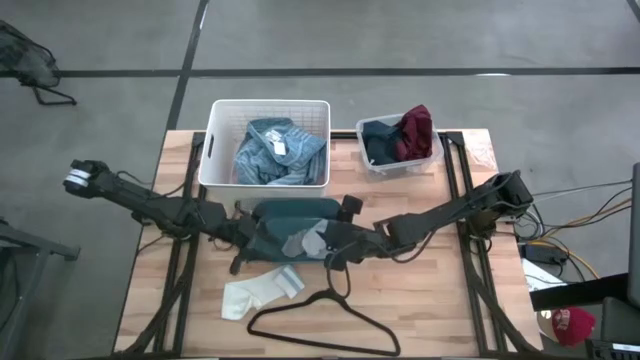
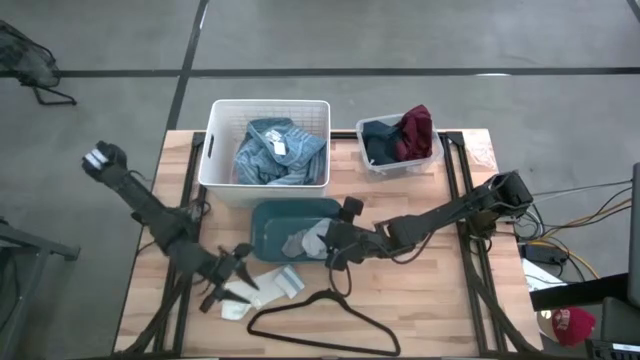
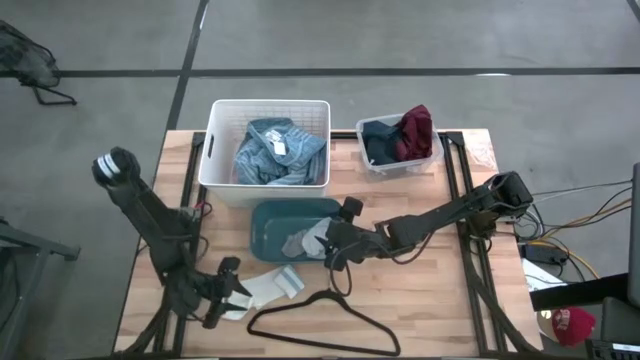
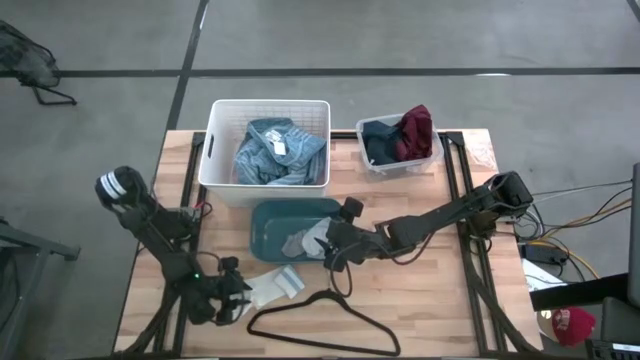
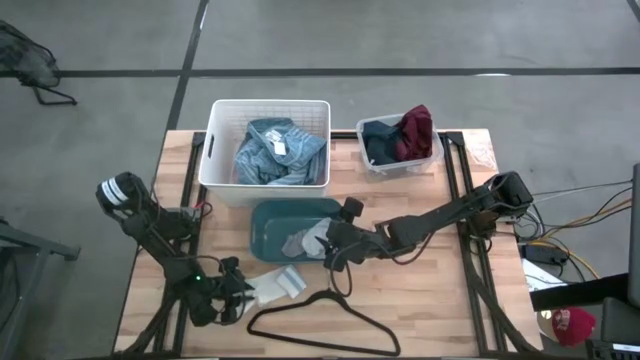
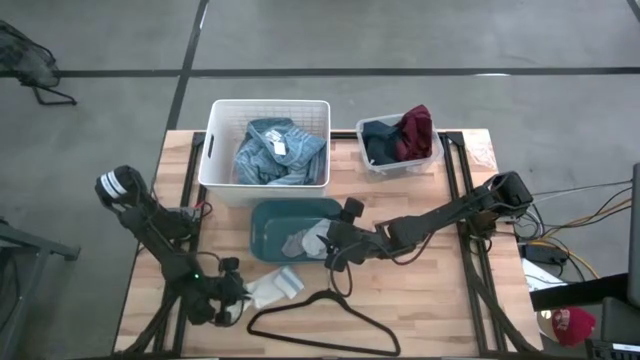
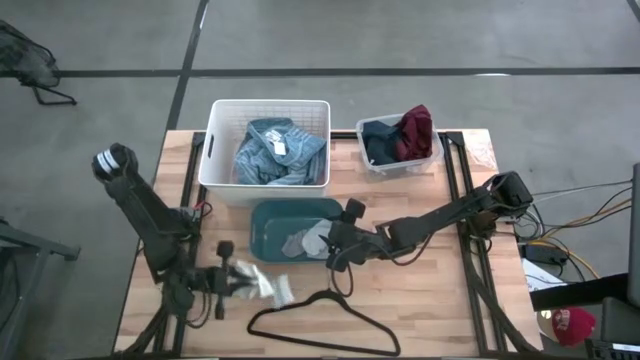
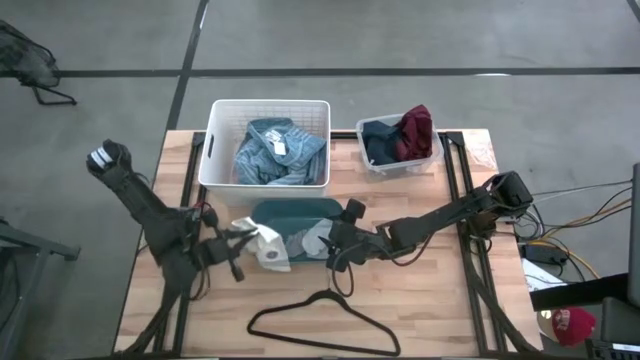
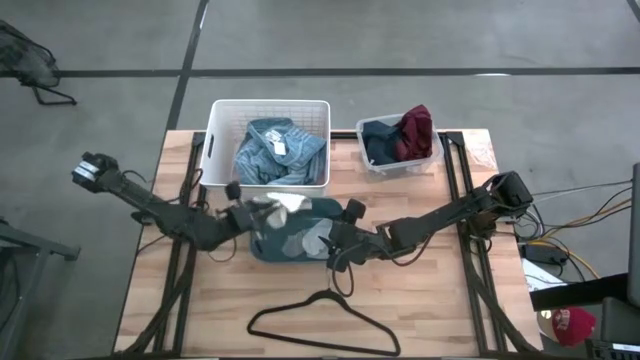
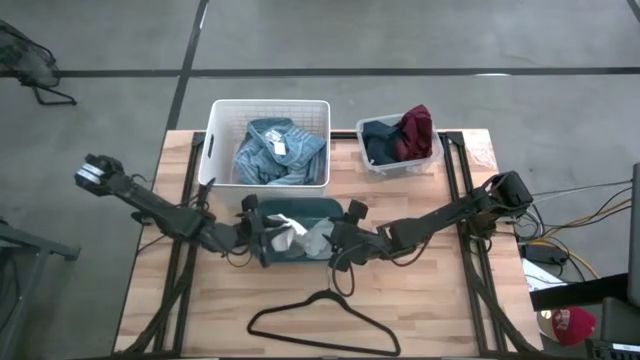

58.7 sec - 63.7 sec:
Task: Pick & Place Cloths
Put the white and blue sock into the blue bin

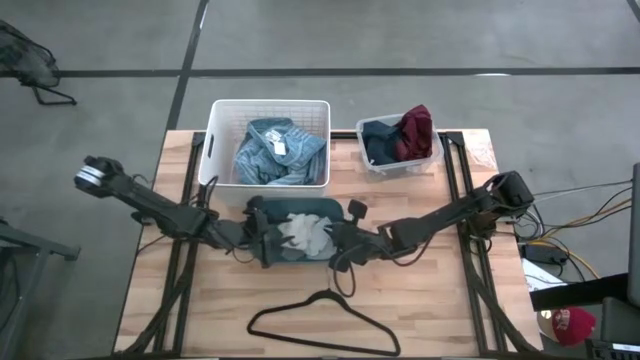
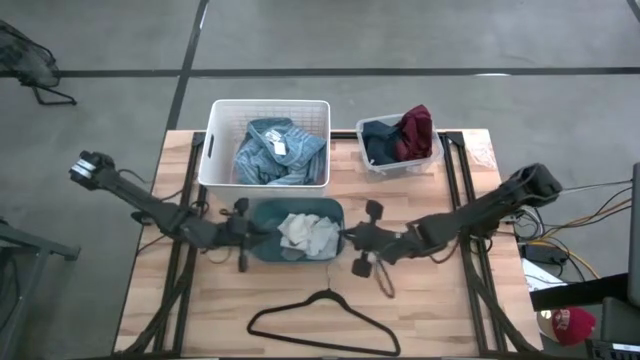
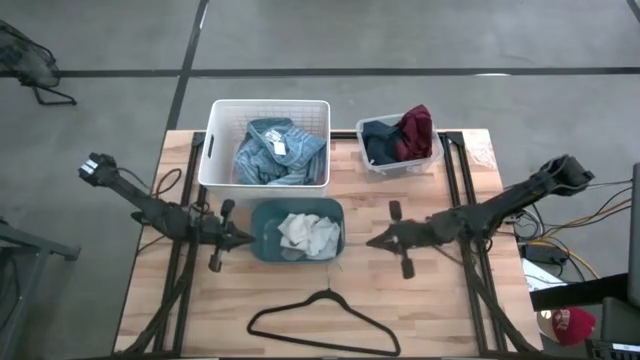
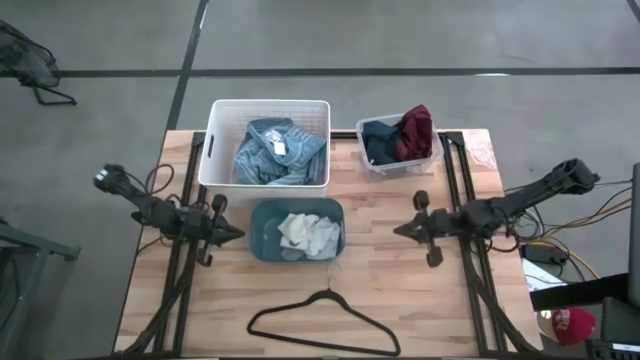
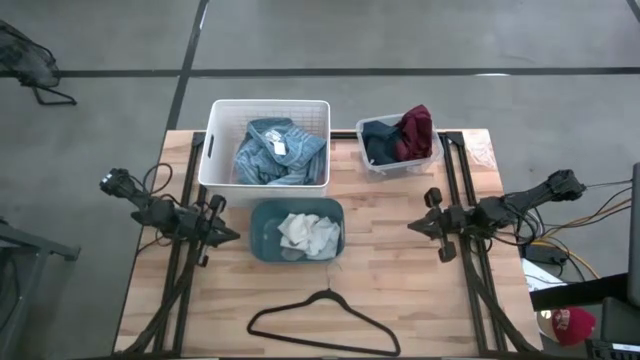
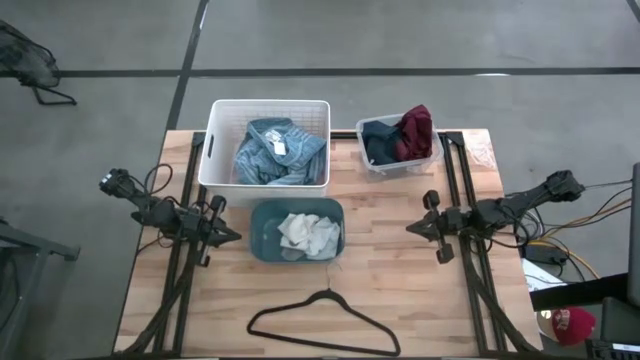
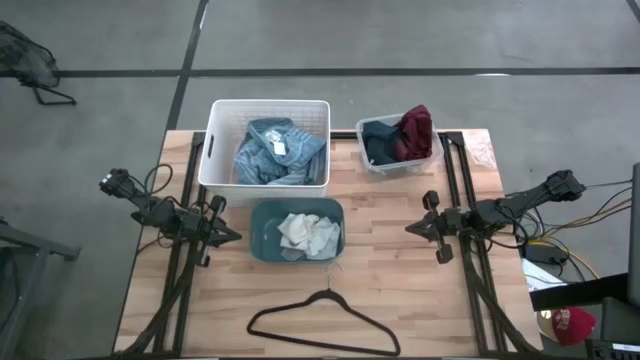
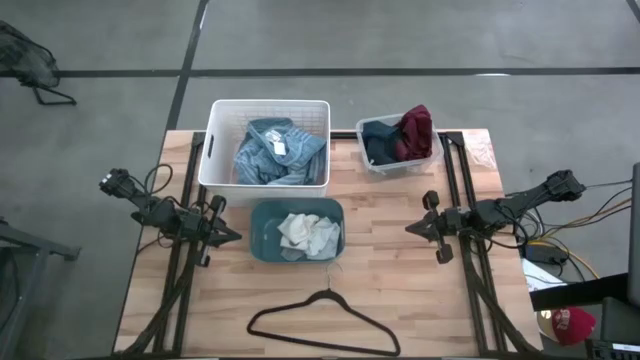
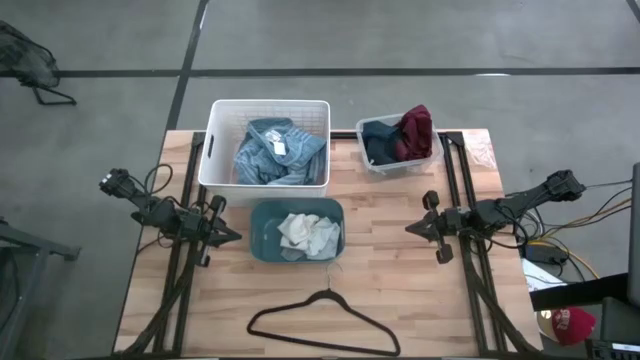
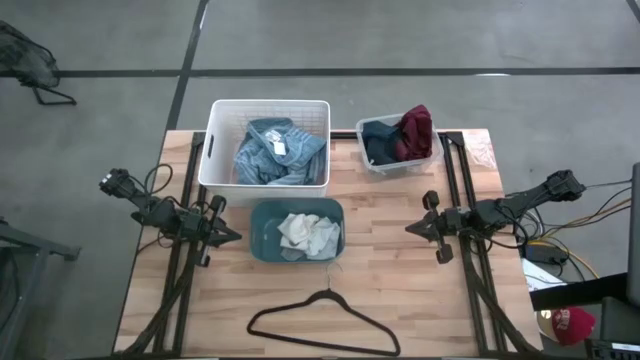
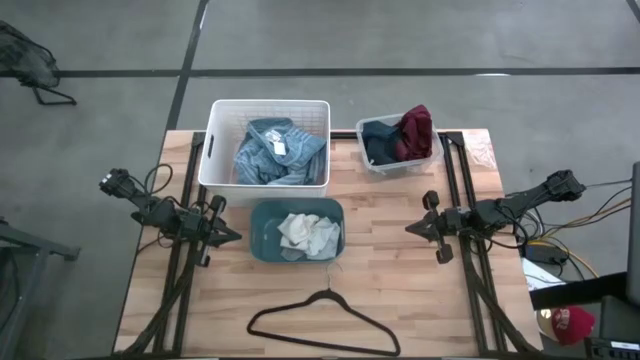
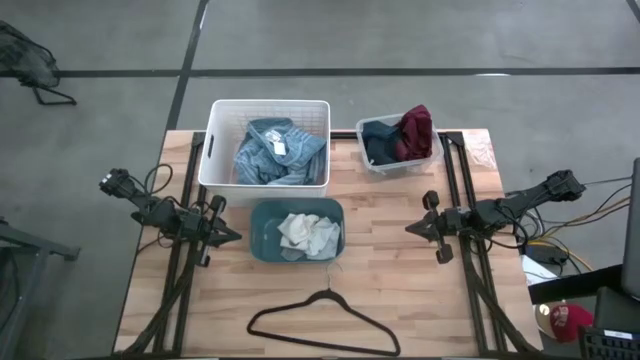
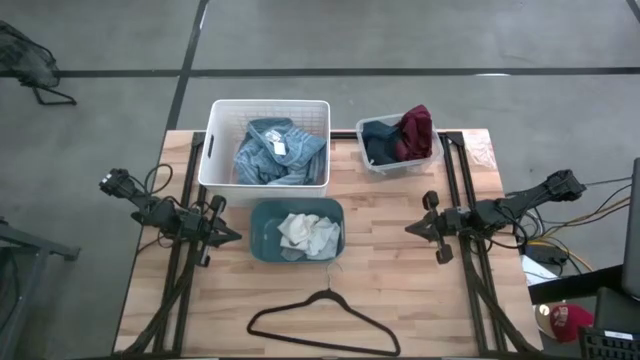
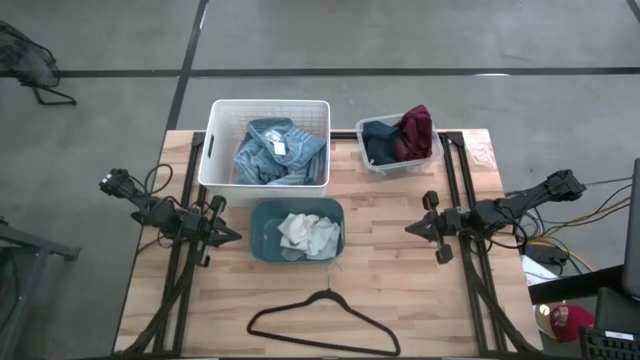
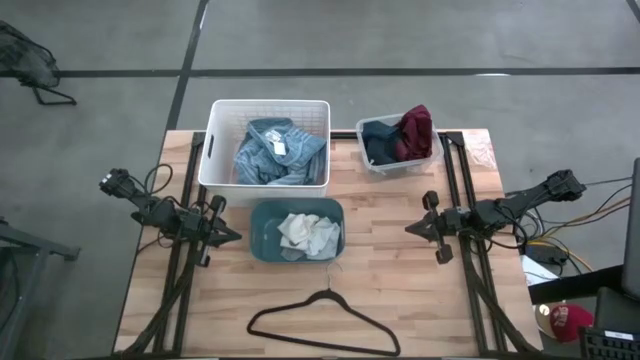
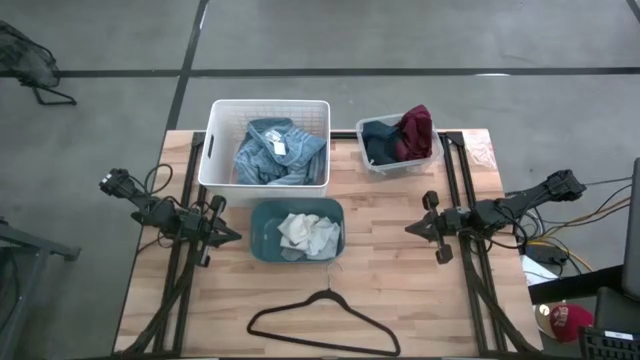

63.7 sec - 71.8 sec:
Return to Home Position

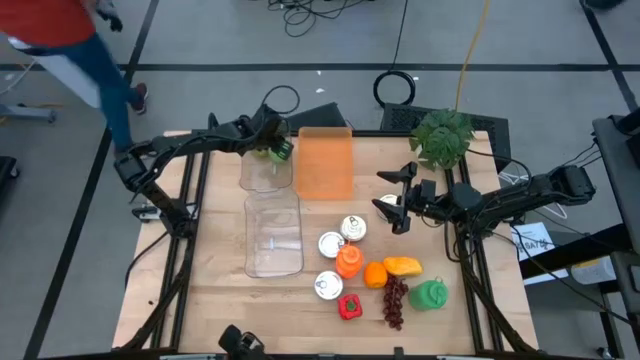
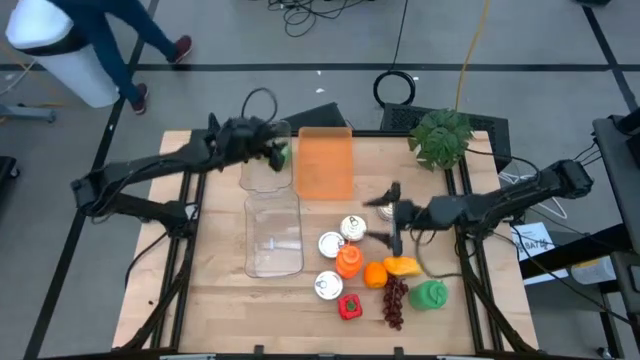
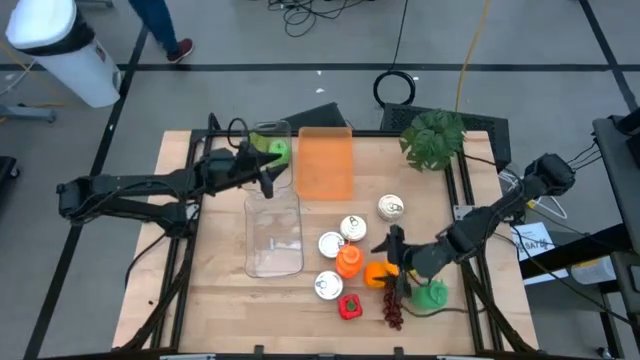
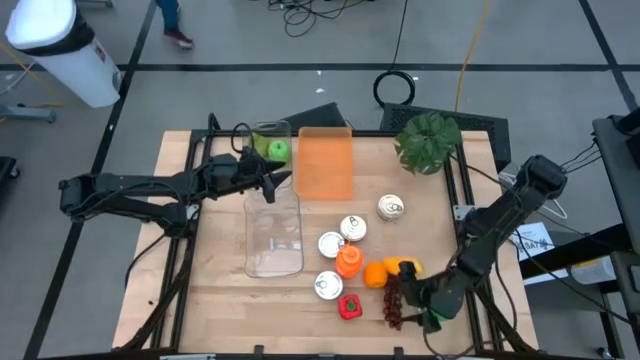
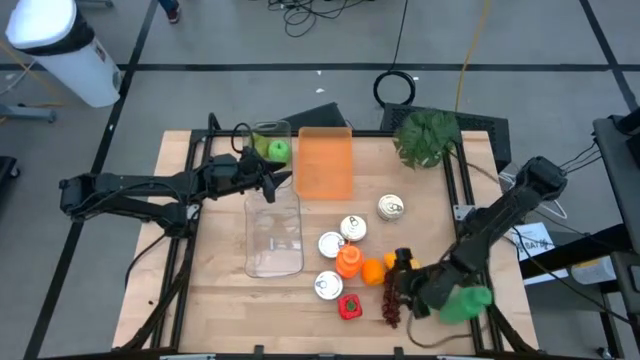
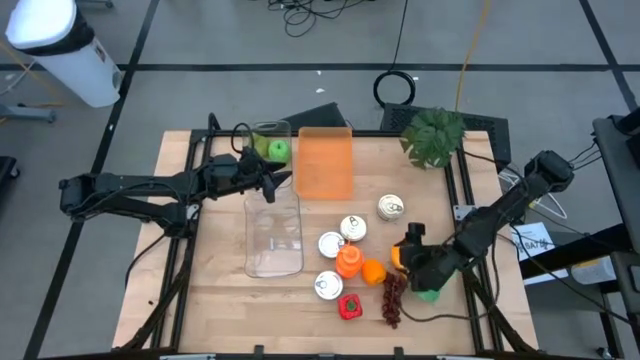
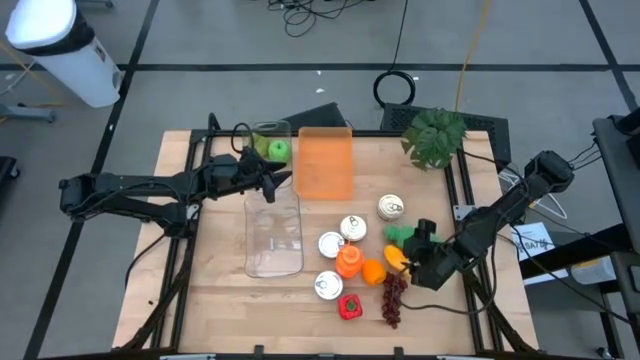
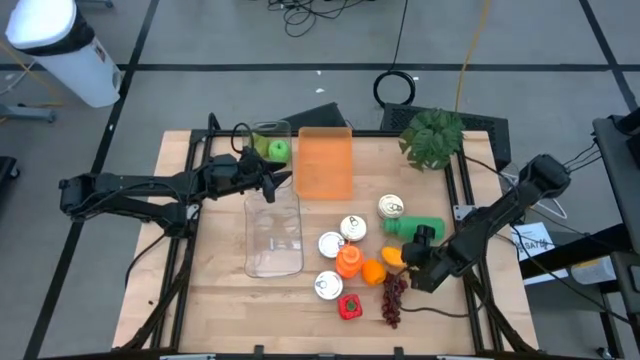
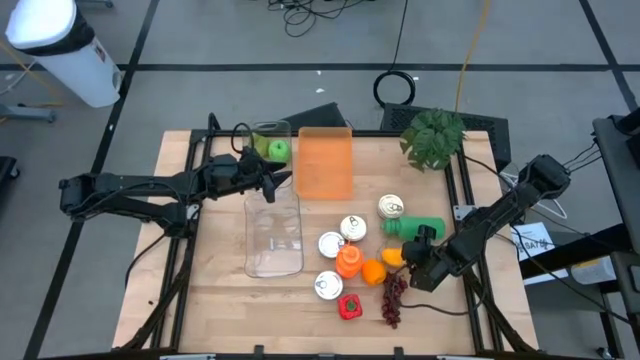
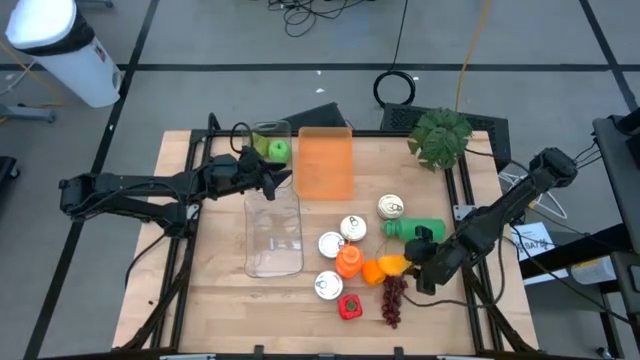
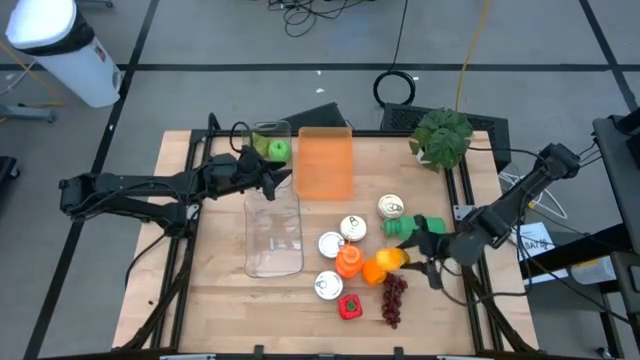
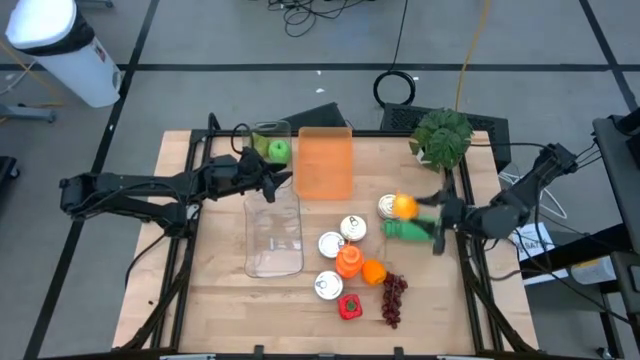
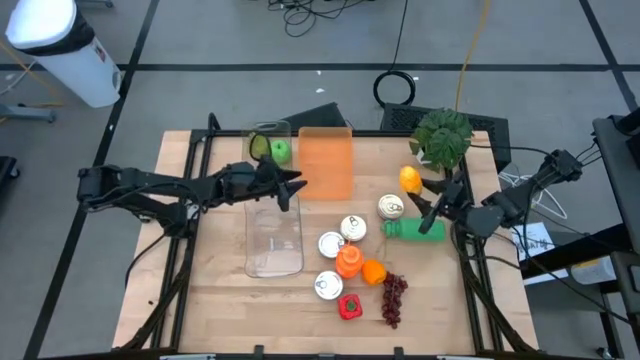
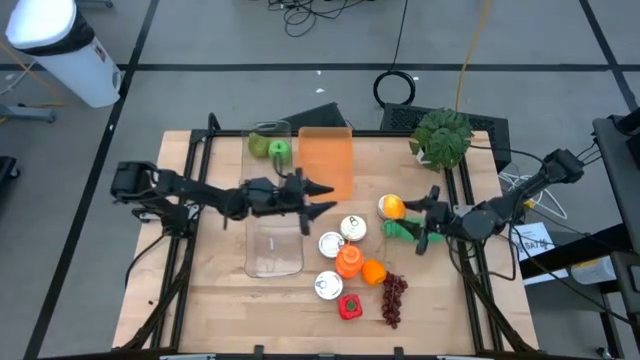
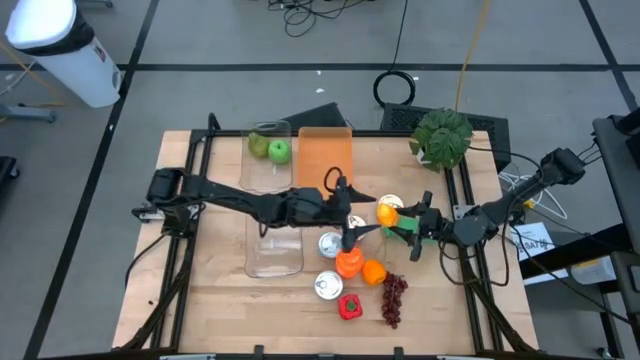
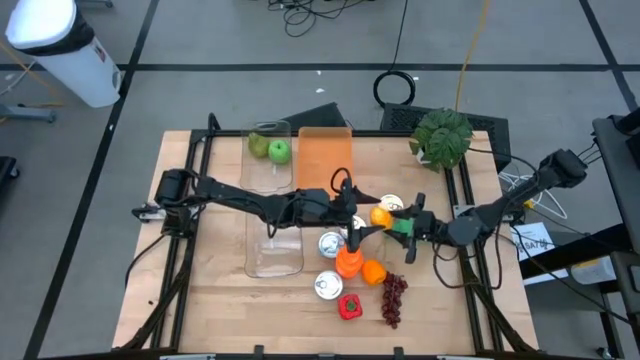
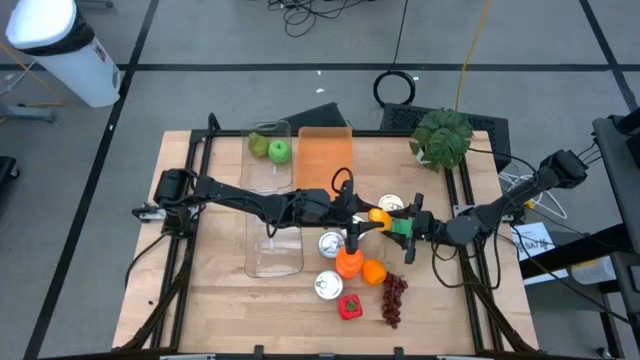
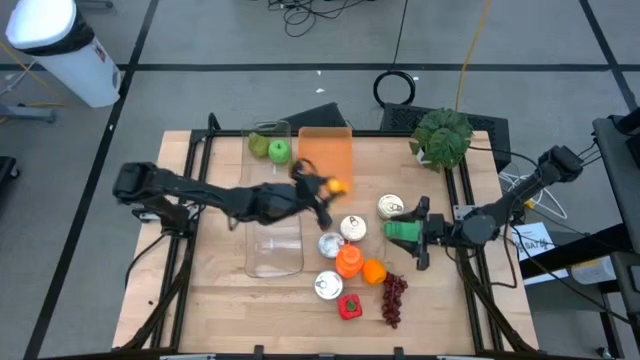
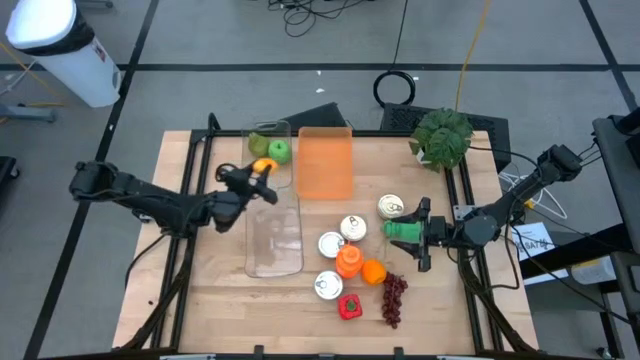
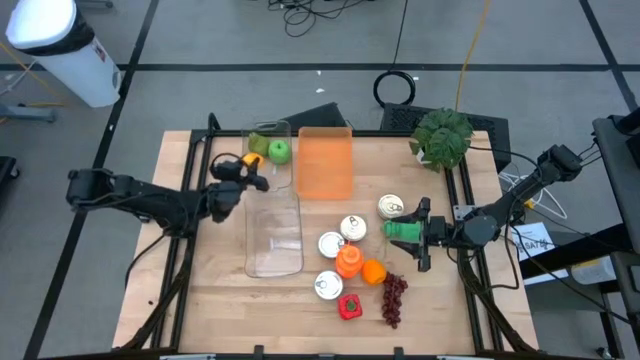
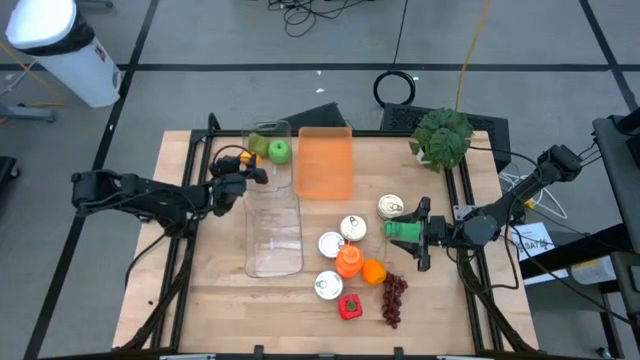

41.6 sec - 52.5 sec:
Task: Pick & Place Food Item
Put the yellow mango into the top transparent bin
